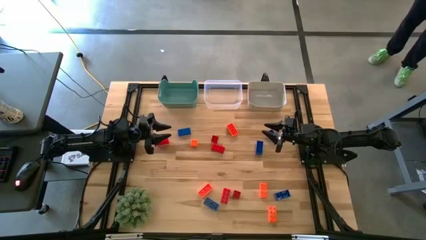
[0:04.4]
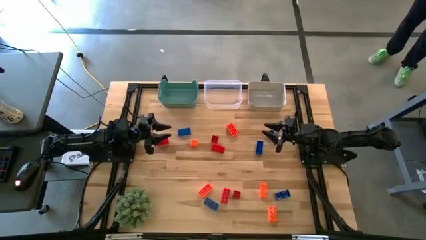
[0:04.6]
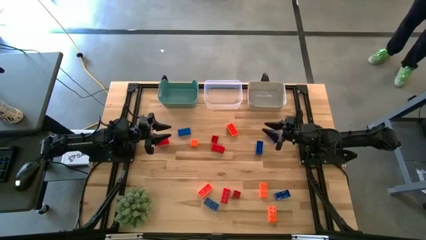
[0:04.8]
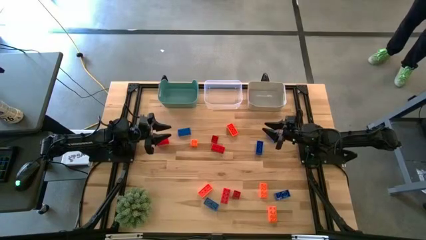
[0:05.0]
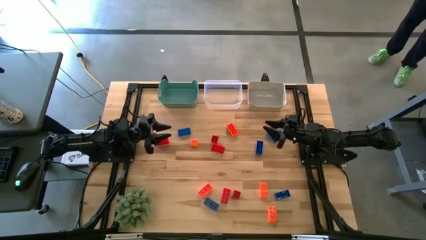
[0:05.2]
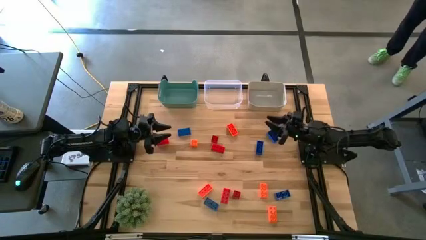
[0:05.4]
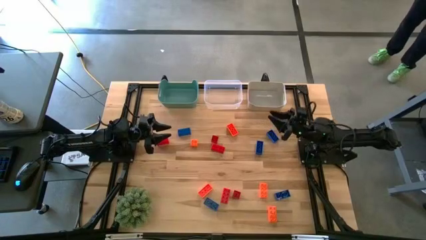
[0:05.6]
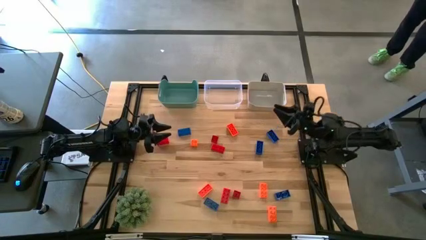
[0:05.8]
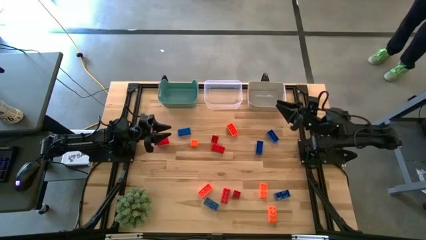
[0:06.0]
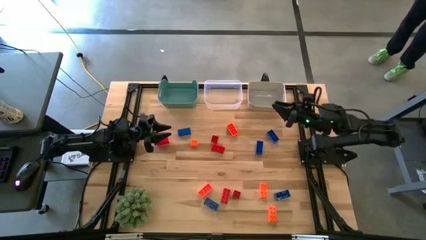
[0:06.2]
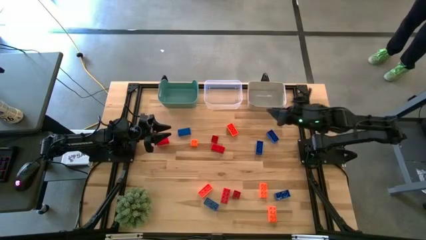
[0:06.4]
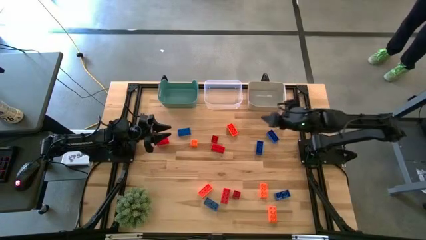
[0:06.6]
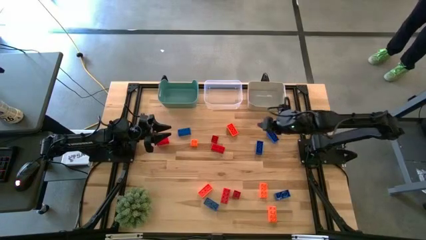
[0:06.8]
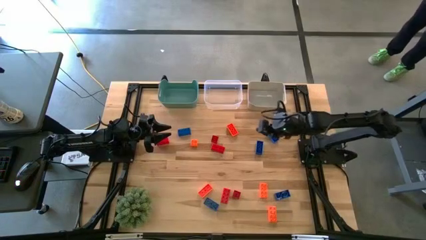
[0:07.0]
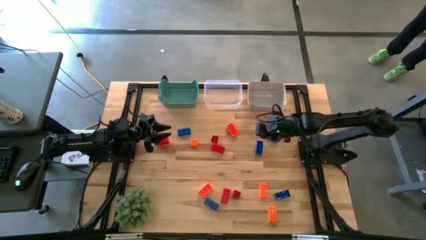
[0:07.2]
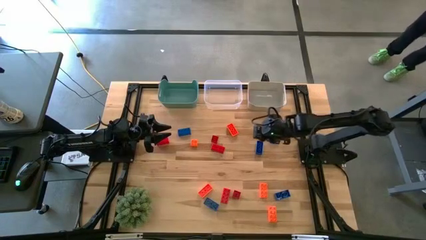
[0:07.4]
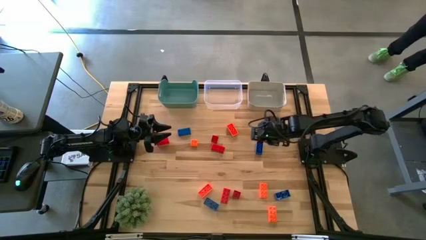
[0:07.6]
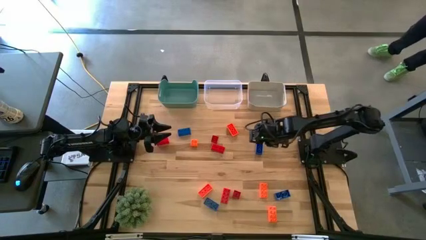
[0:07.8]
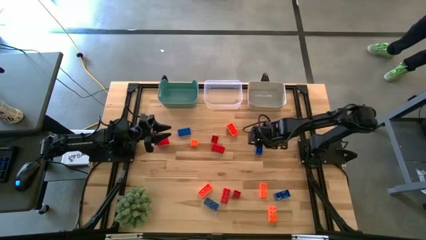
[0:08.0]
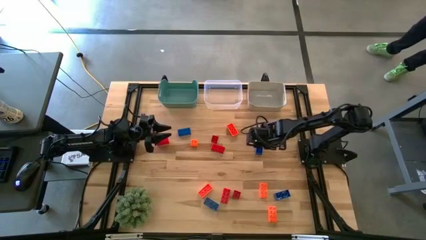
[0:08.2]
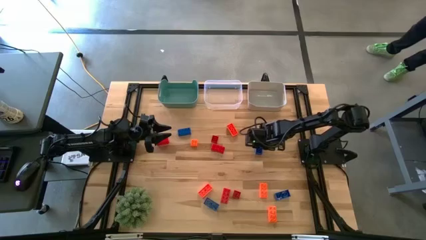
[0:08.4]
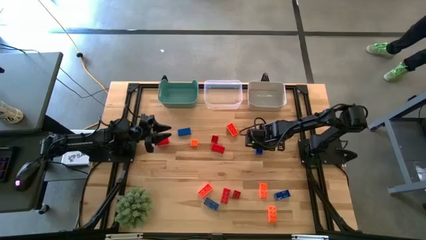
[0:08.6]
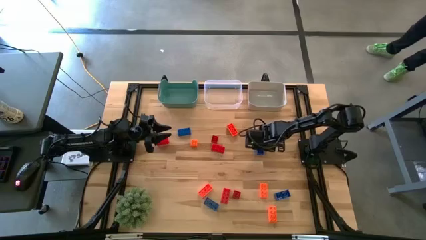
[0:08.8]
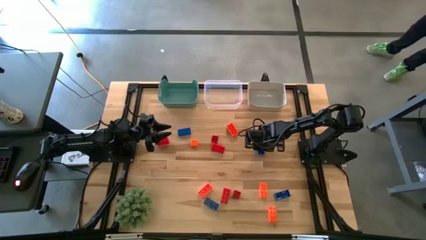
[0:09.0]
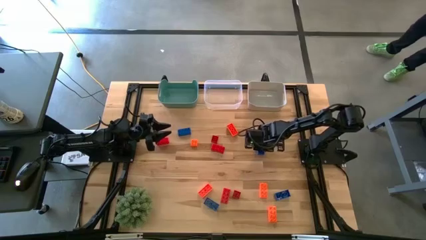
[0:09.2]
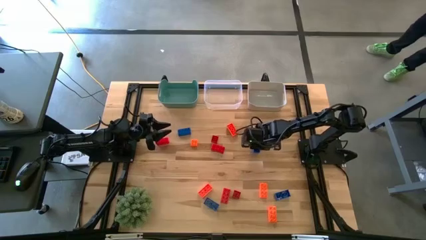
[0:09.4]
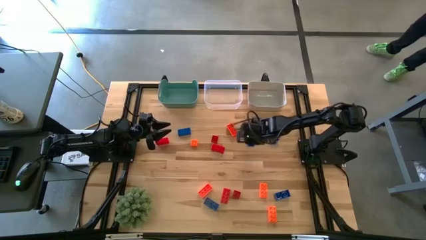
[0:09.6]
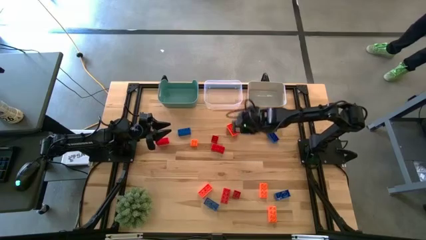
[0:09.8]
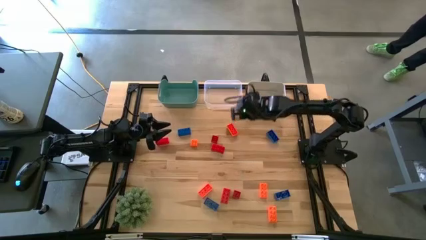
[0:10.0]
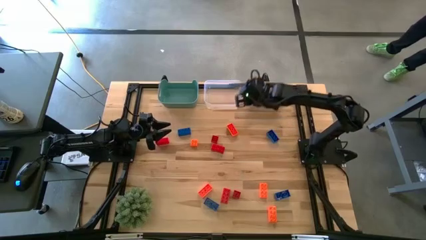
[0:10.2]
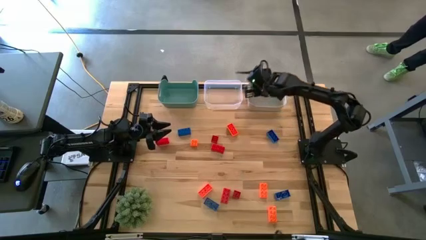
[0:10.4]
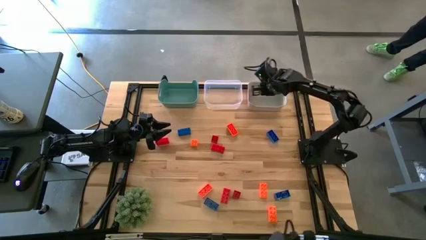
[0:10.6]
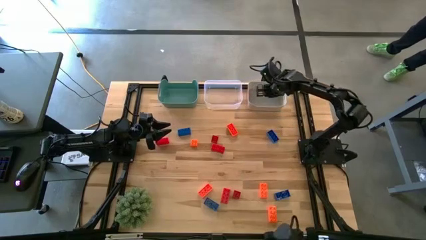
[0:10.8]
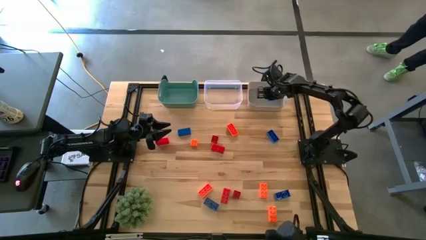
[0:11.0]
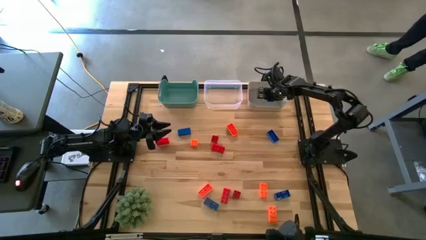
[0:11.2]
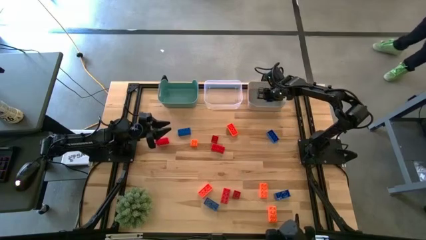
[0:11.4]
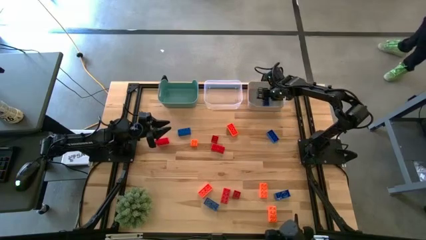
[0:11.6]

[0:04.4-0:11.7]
Task: Sort & place blocks by color
Put the blue game piece into the white bin

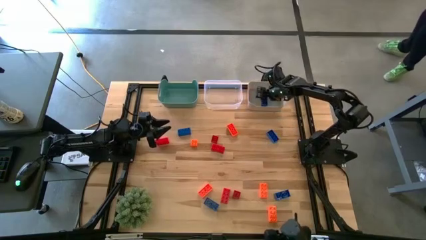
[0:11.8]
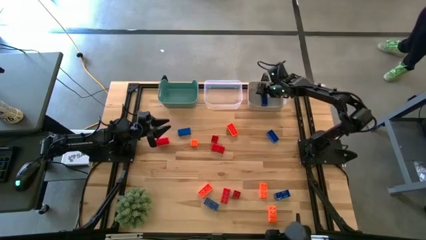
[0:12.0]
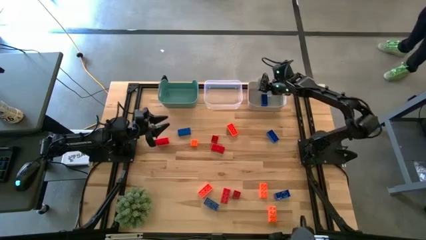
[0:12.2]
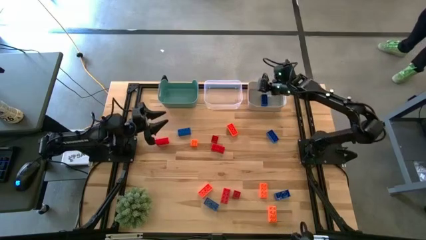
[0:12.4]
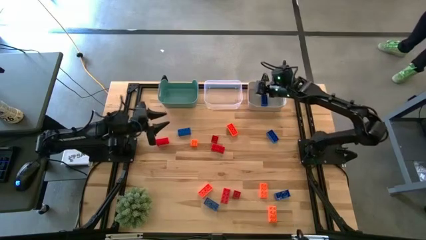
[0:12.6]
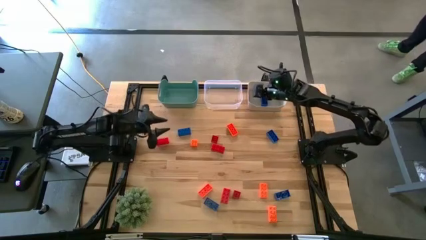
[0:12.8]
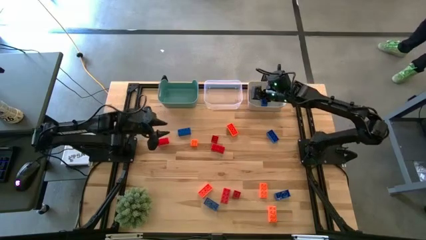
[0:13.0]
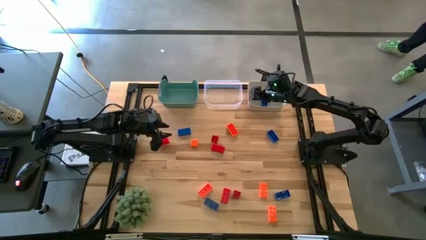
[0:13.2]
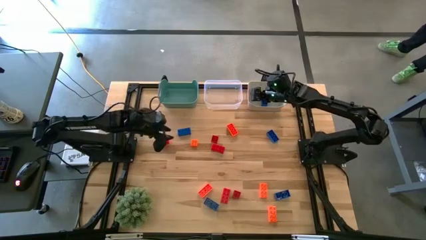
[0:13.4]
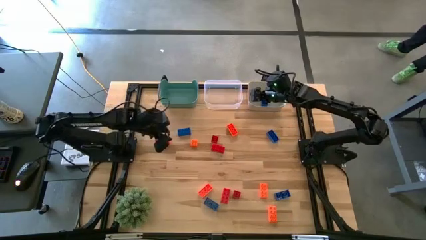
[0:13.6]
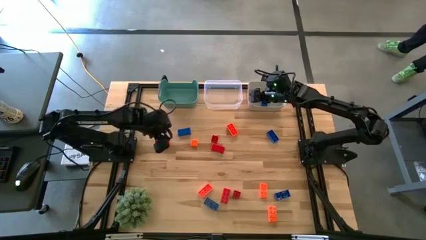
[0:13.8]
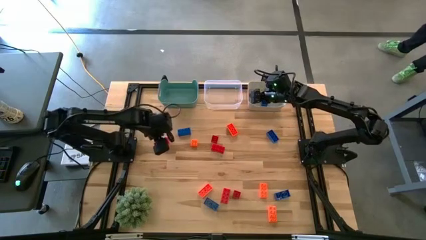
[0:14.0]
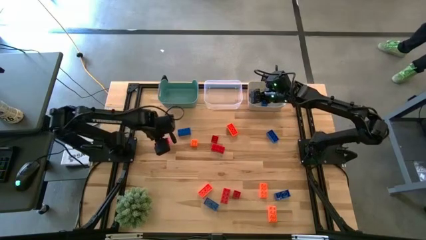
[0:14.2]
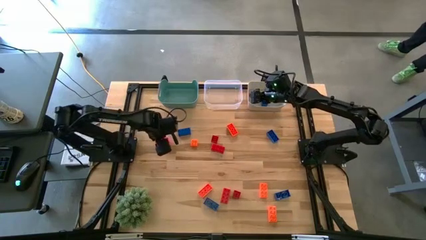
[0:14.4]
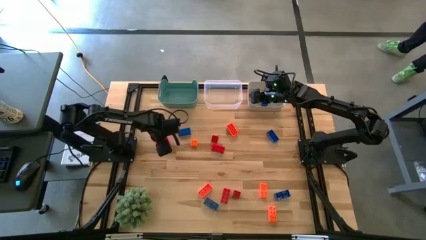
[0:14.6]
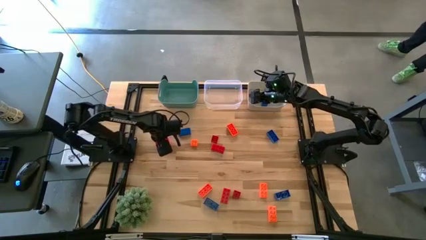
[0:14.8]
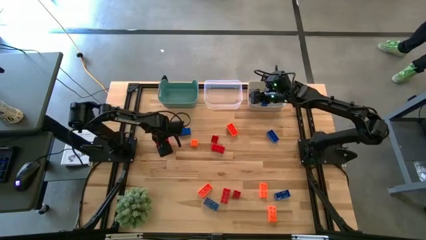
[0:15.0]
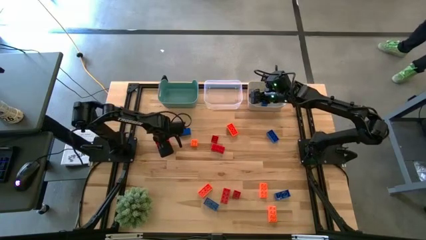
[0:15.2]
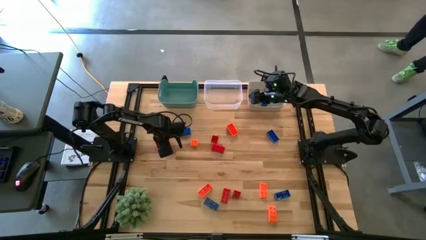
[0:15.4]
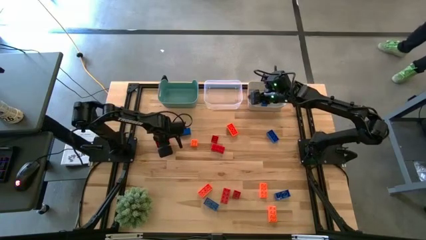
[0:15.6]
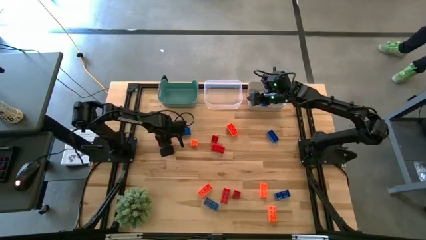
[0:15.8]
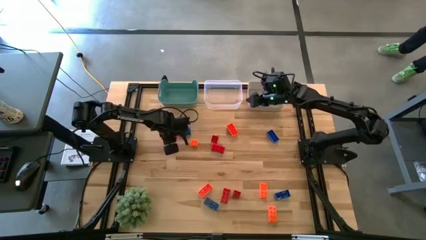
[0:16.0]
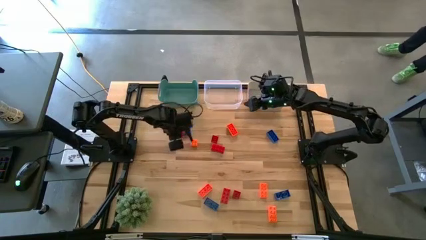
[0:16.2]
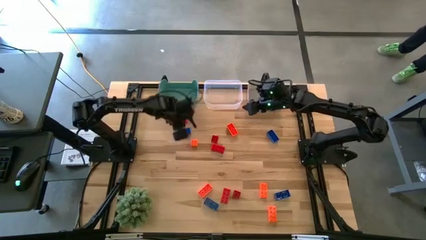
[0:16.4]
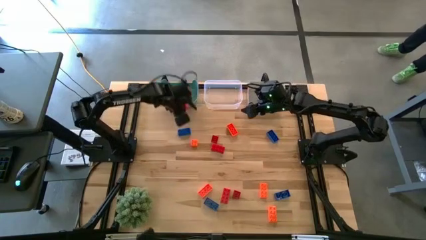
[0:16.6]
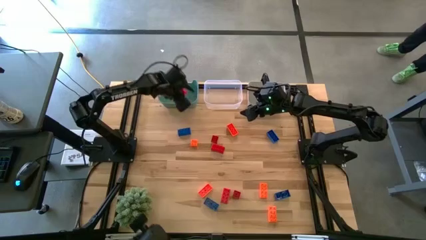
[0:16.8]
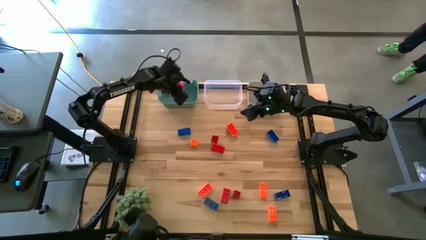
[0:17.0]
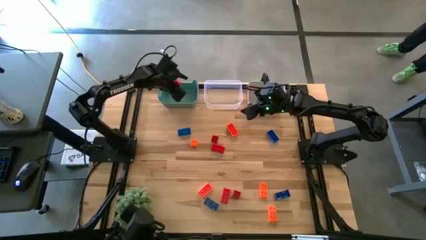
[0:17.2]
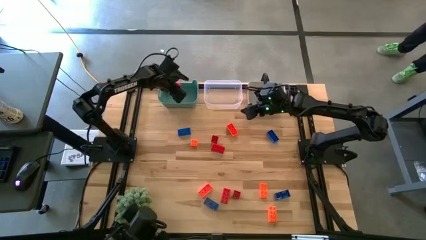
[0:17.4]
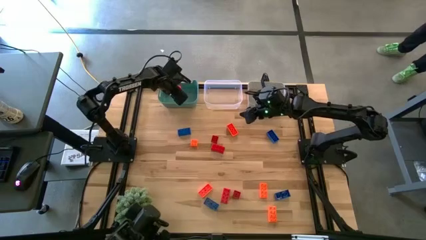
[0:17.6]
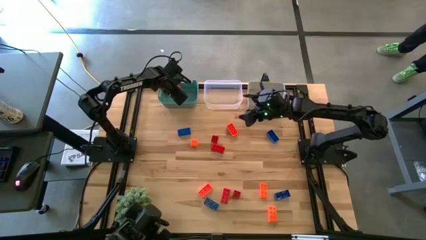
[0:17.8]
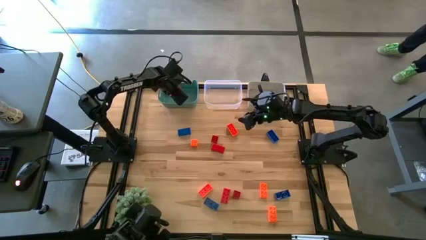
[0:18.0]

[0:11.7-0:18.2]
Put the red game piece into the blue bin

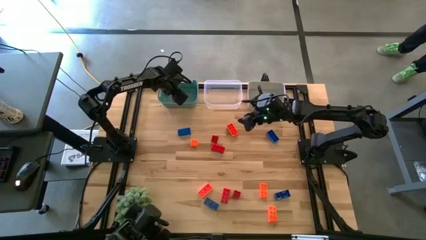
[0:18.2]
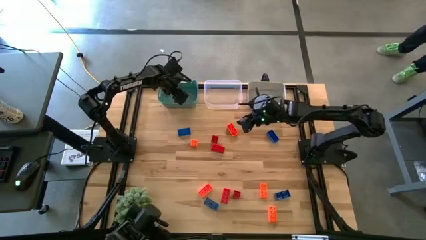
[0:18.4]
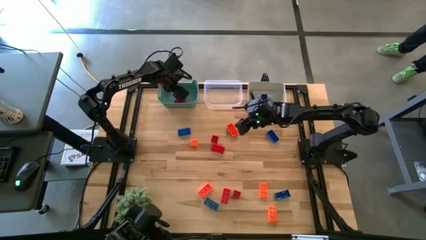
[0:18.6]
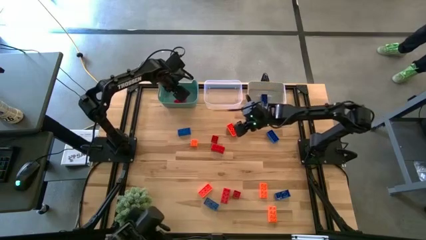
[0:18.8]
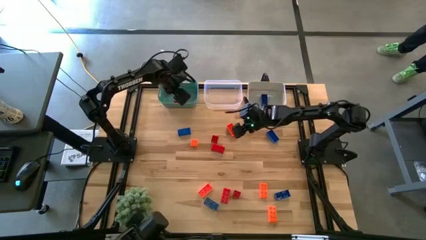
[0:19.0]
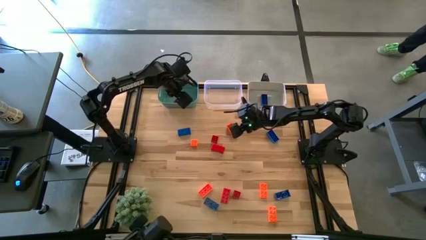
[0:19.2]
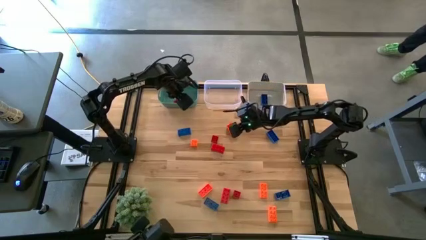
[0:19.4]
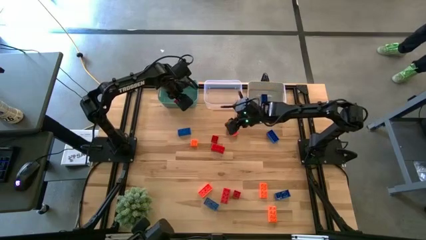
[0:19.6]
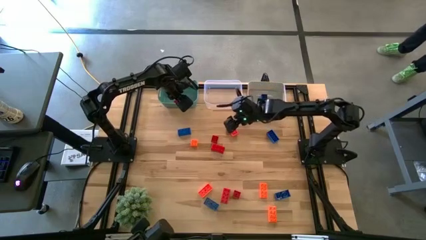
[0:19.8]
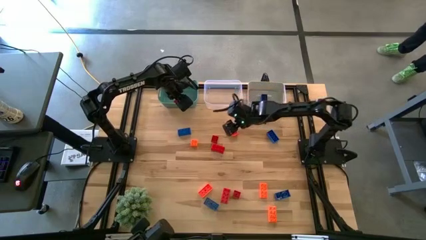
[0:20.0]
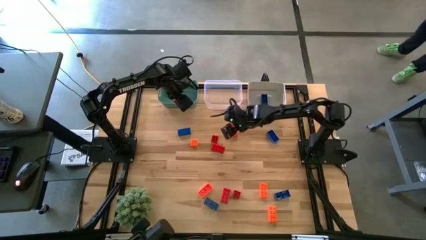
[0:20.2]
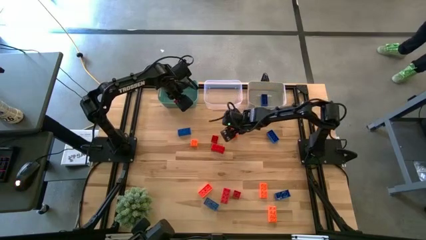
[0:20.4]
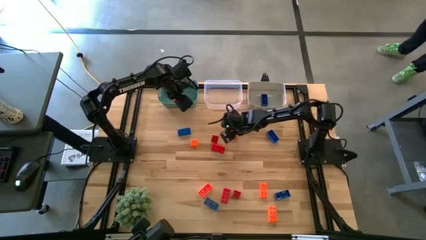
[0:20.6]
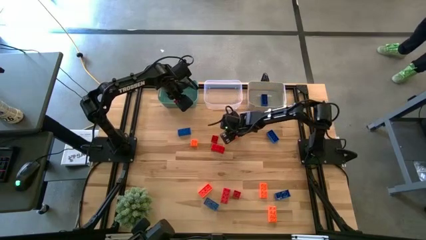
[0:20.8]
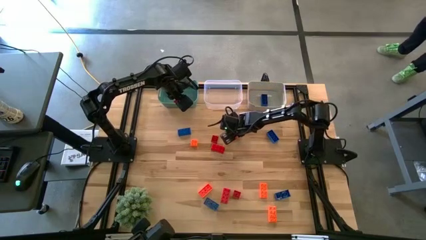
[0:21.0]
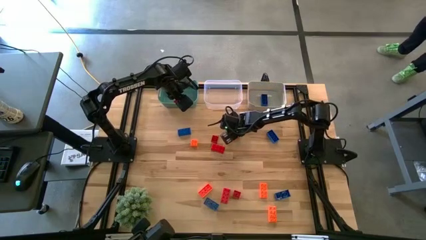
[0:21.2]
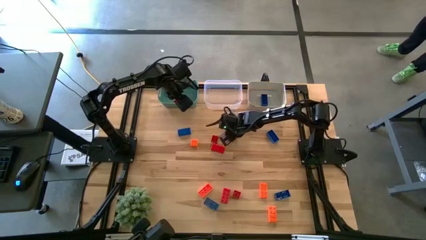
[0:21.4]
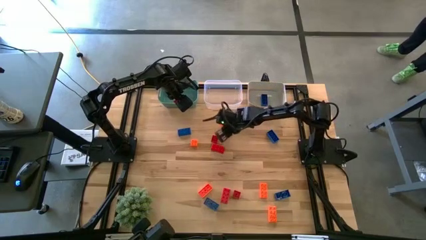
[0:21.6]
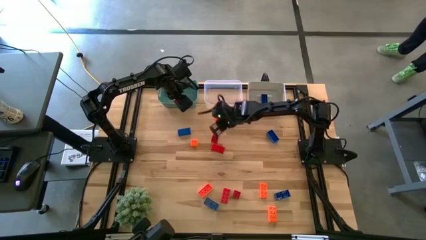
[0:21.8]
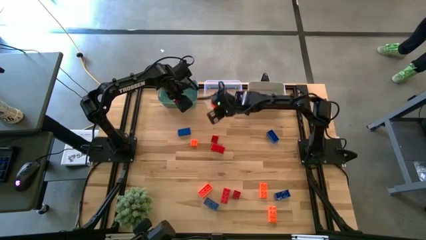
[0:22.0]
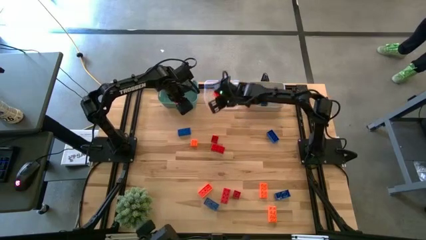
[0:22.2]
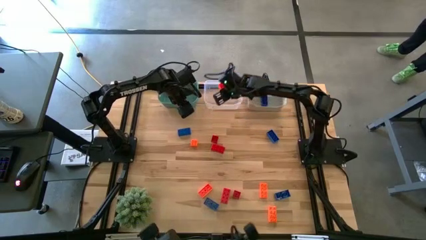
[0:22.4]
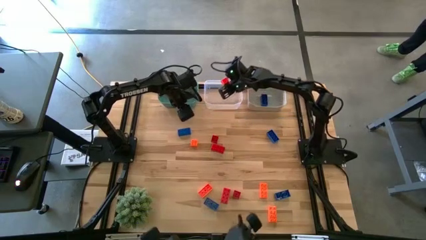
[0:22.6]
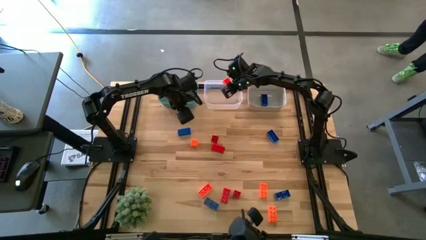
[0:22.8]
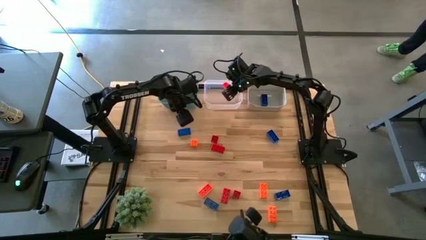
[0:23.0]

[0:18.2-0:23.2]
Put the orange game piece into the transparent bin
